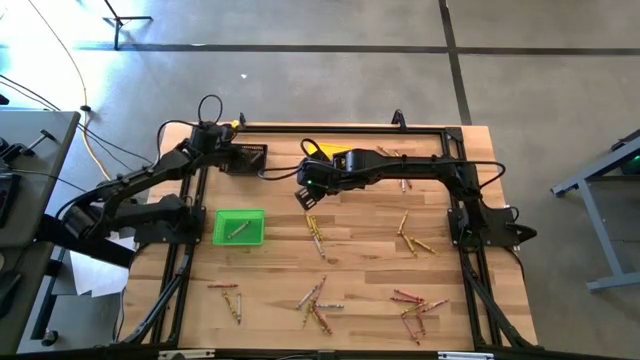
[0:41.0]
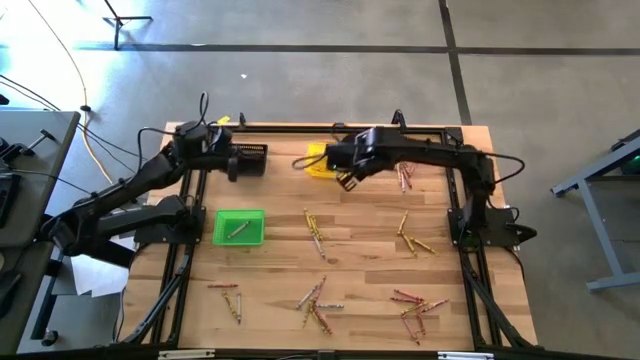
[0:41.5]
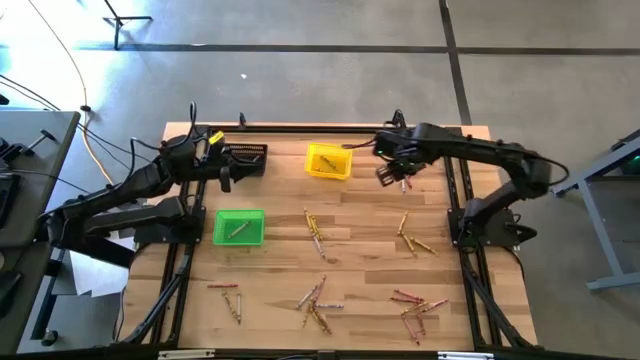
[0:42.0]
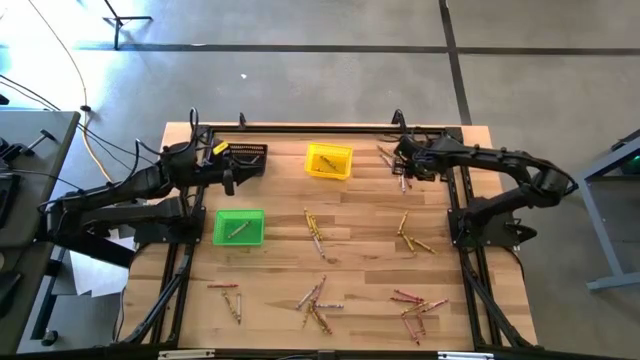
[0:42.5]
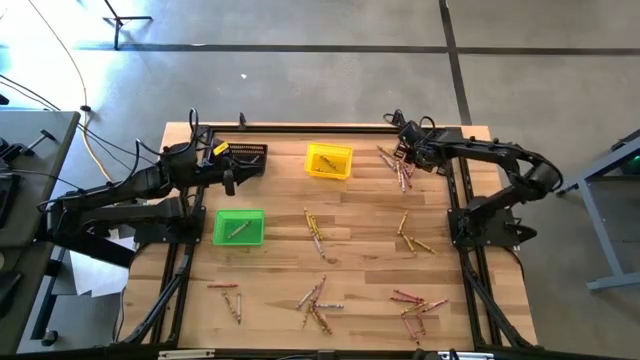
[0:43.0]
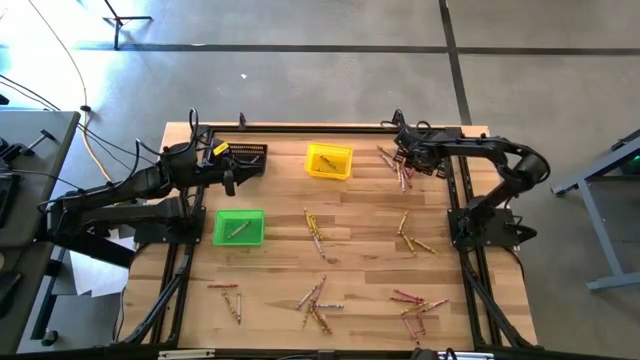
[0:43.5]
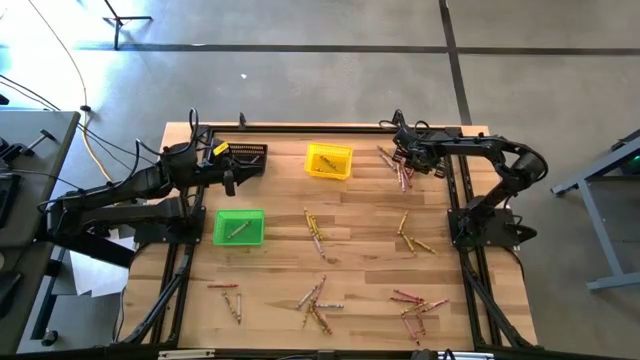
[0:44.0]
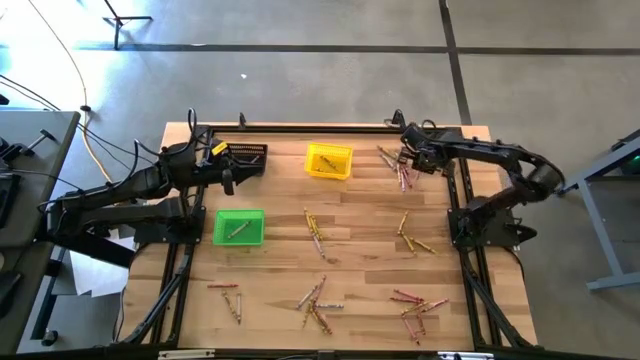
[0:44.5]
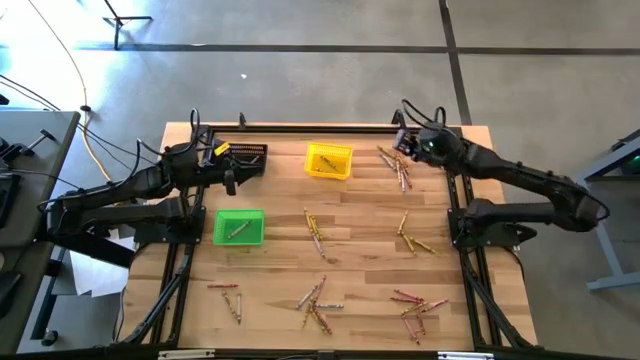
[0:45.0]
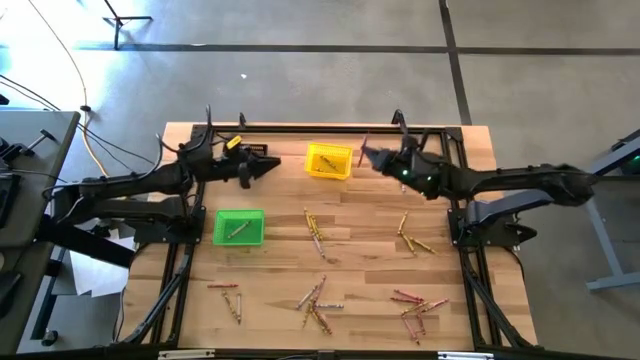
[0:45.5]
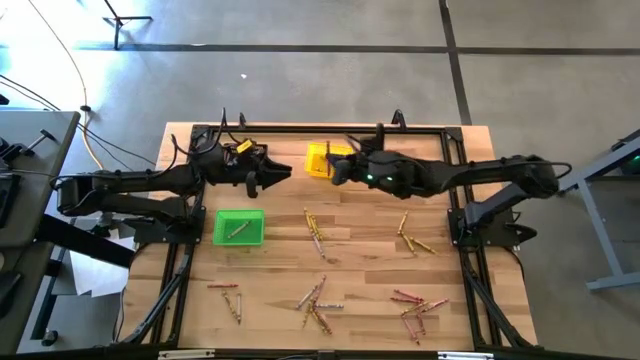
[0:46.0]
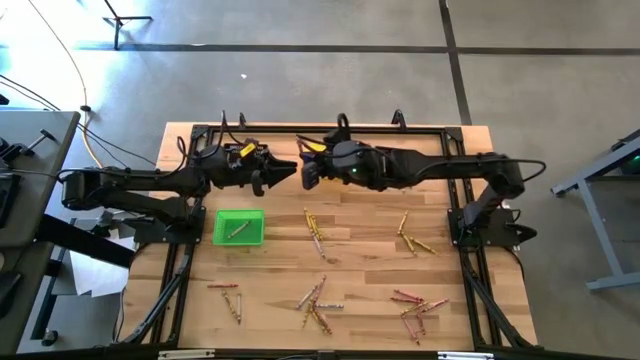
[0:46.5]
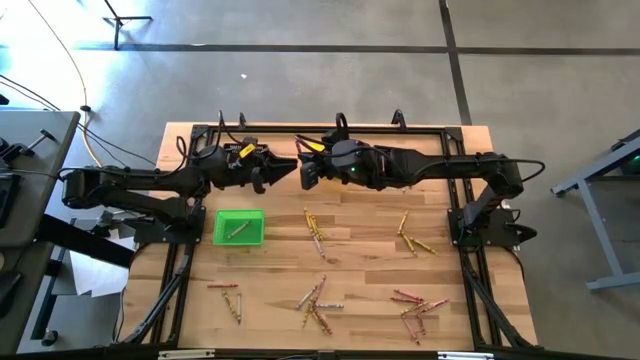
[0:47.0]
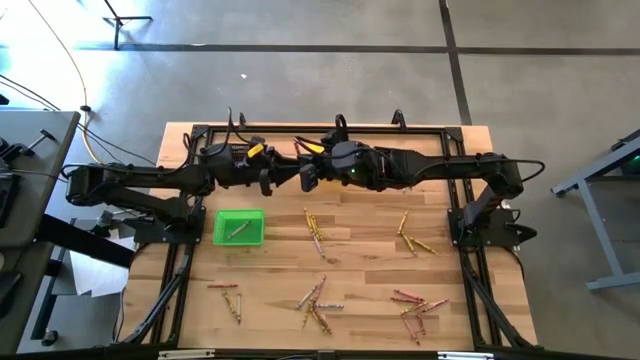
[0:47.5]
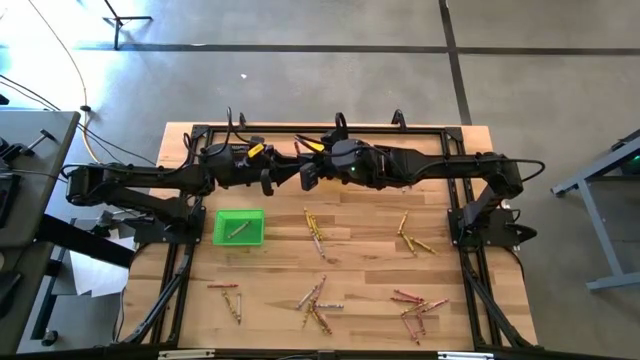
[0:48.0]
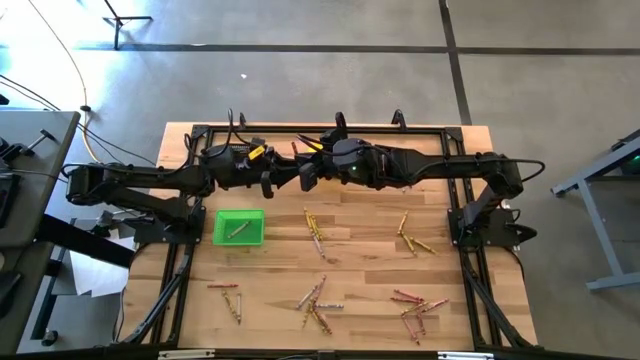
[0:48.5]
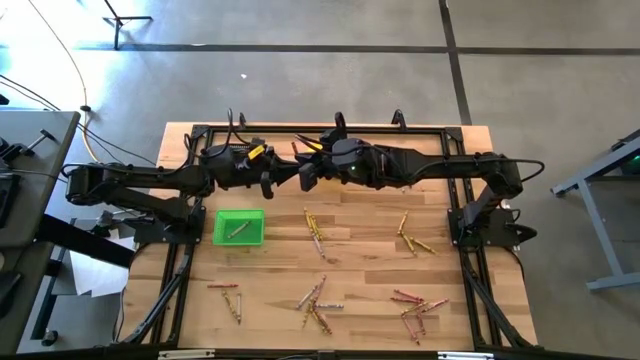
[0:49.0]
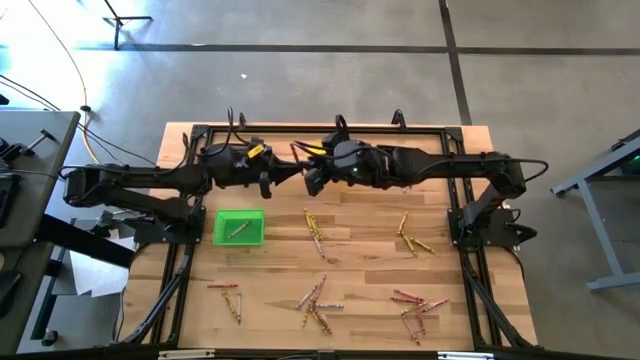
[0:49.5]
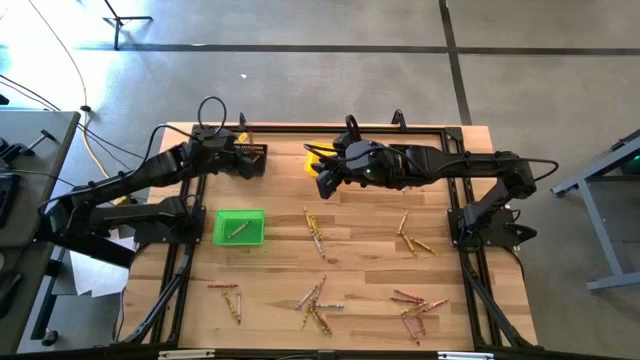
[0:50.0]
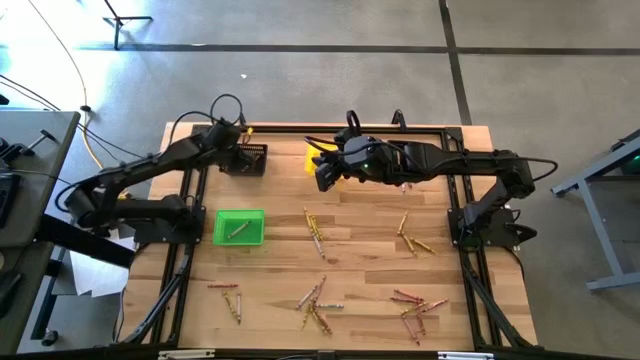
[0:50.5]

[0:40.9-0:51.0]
Task: Sort crayons
Put the red crayon into the black bin

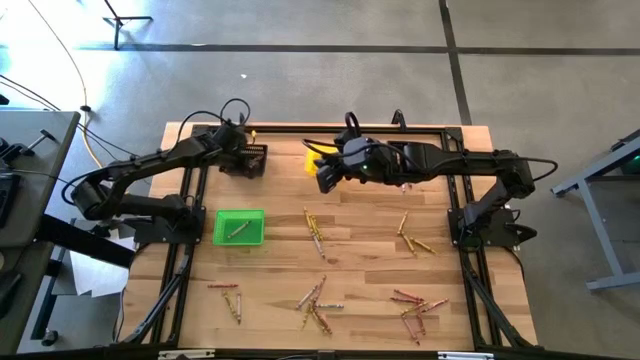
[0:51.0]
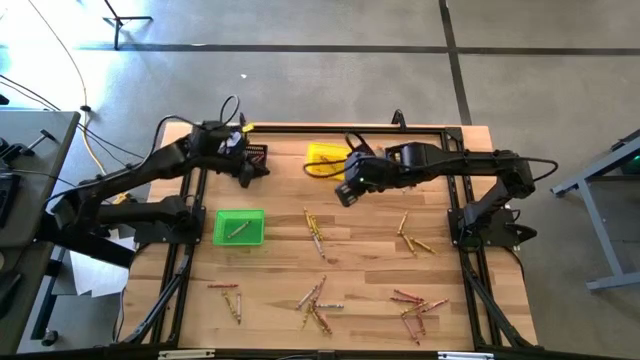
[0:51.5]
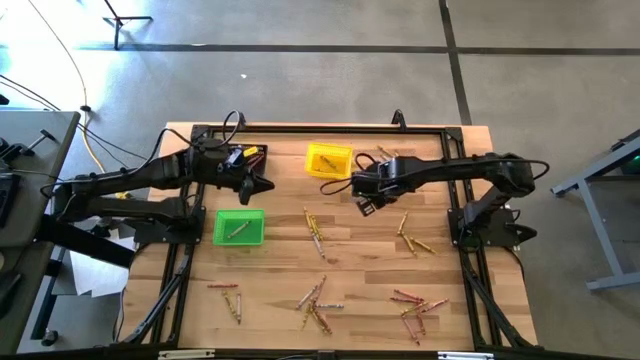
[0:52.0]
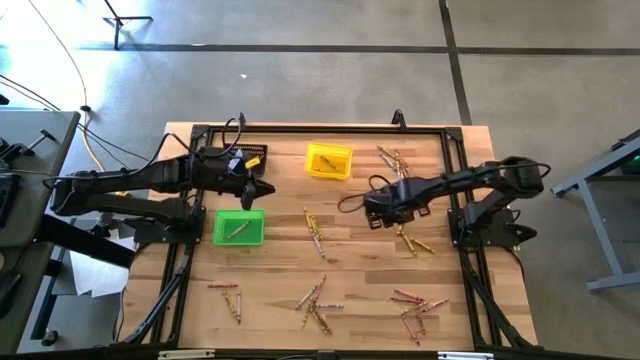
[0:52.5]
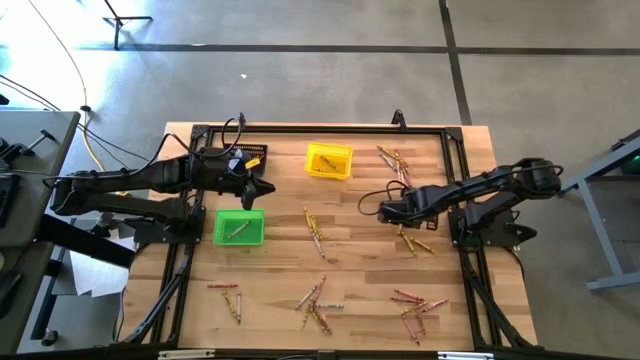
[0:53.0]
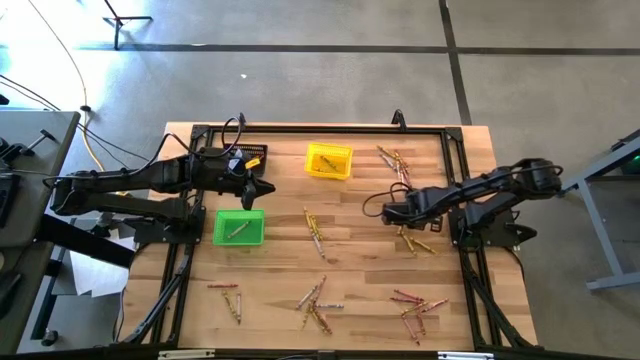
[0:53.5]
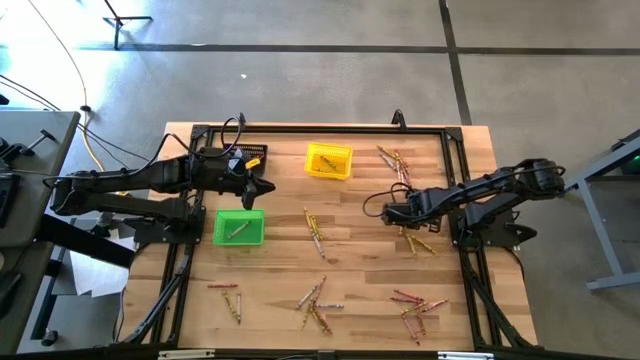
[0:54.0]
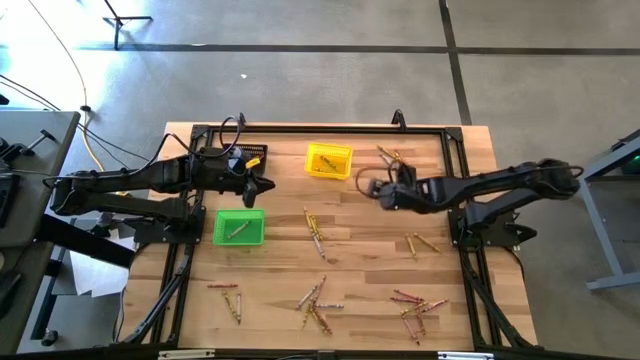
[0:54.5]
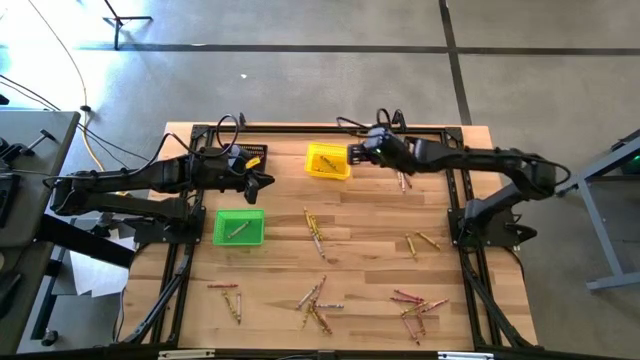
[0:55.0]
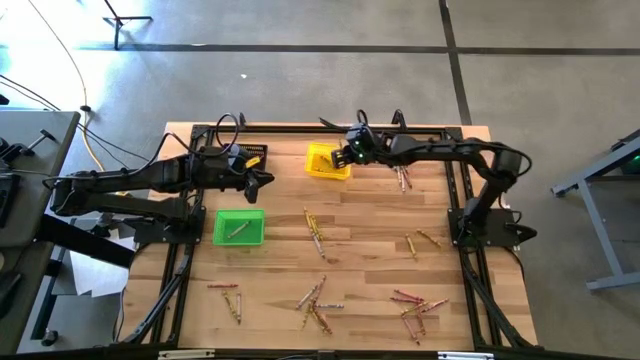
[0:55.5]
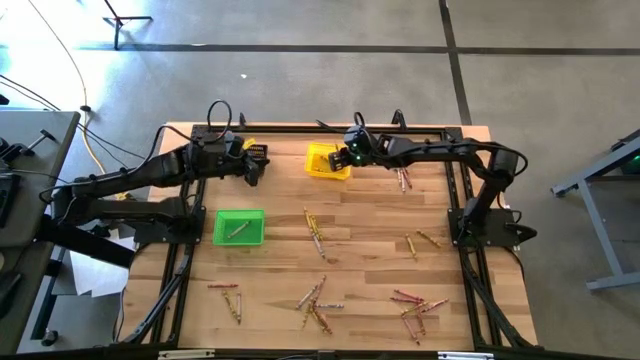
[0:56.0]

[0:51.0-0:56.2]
Put the yellow crayon into the yellow bin

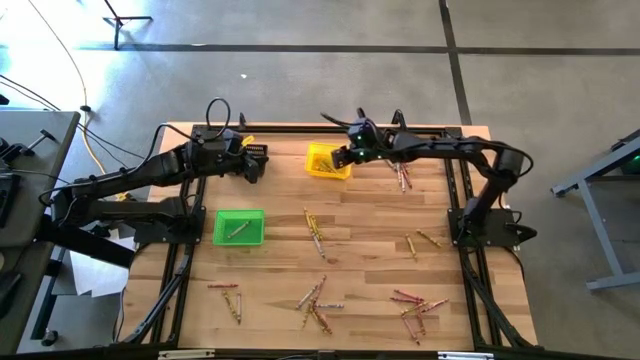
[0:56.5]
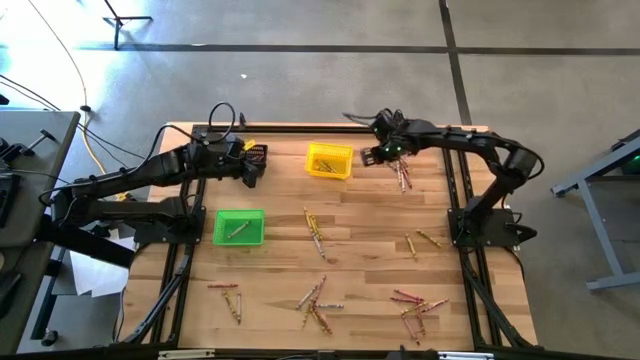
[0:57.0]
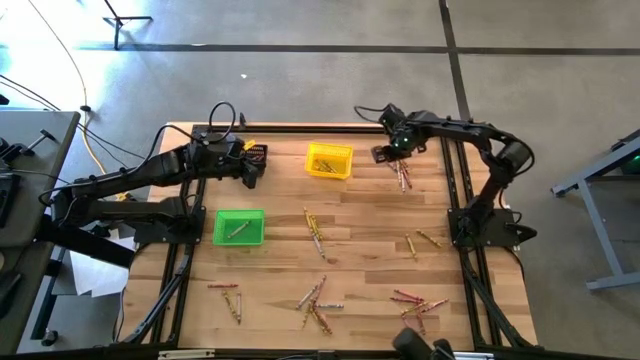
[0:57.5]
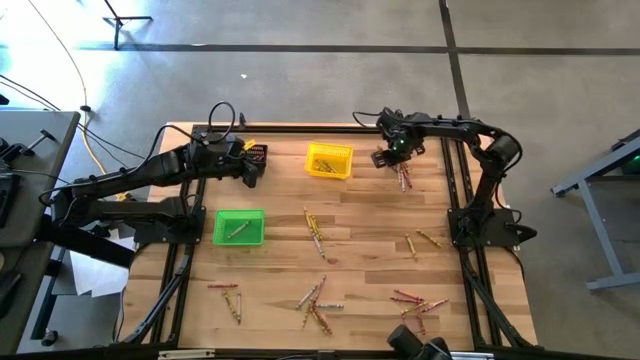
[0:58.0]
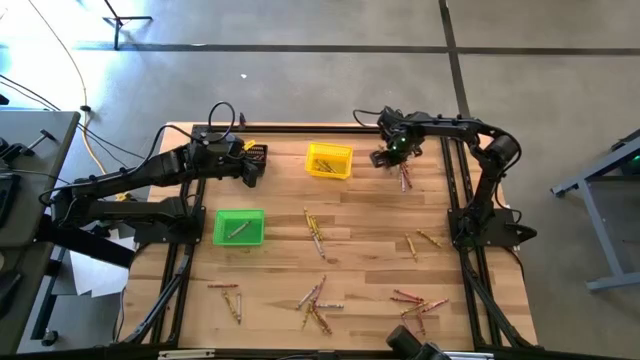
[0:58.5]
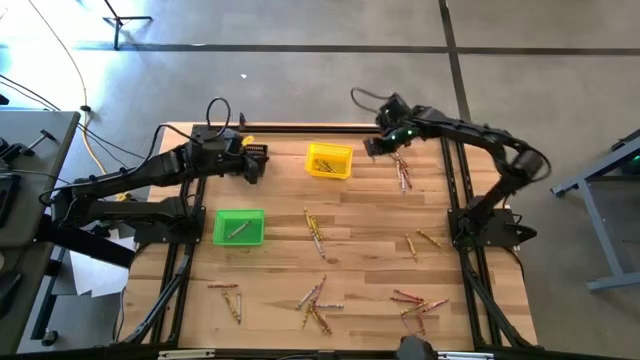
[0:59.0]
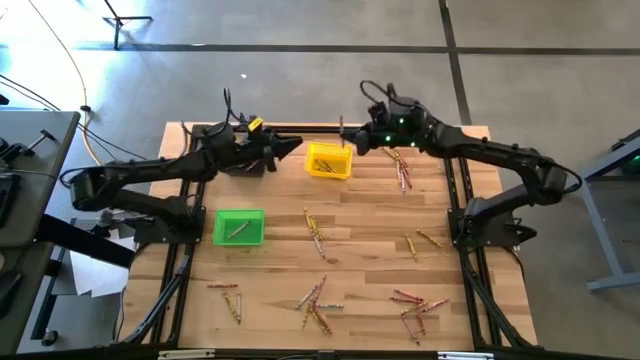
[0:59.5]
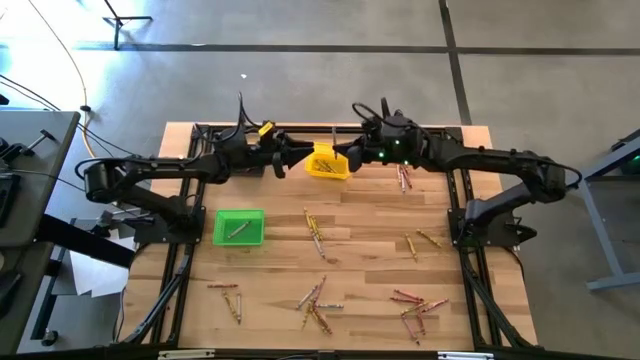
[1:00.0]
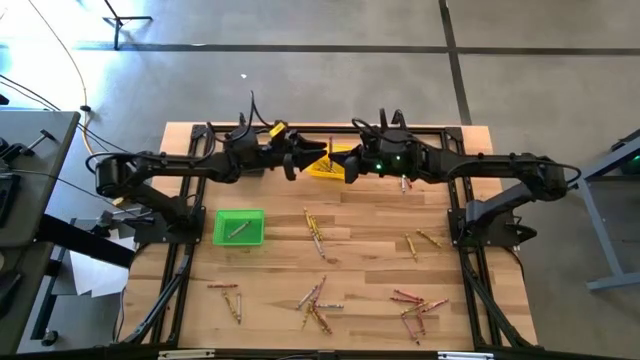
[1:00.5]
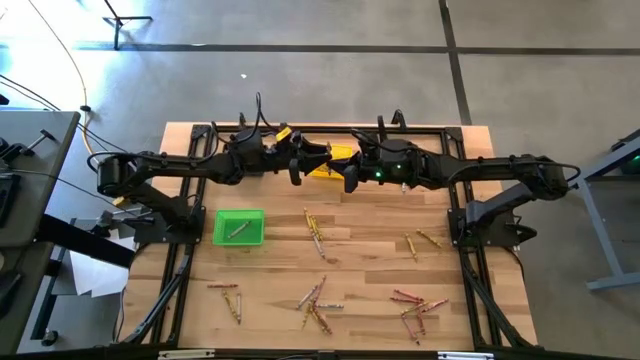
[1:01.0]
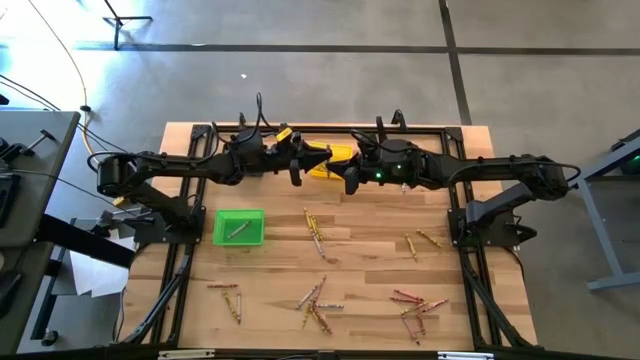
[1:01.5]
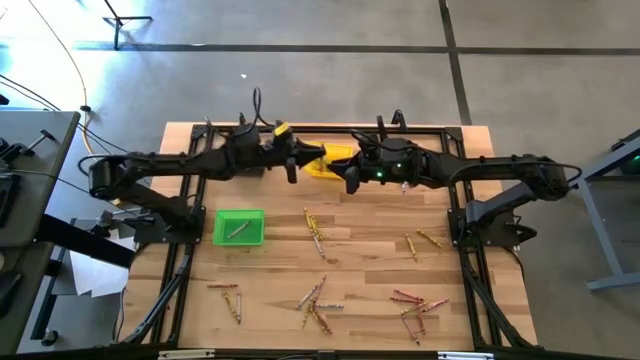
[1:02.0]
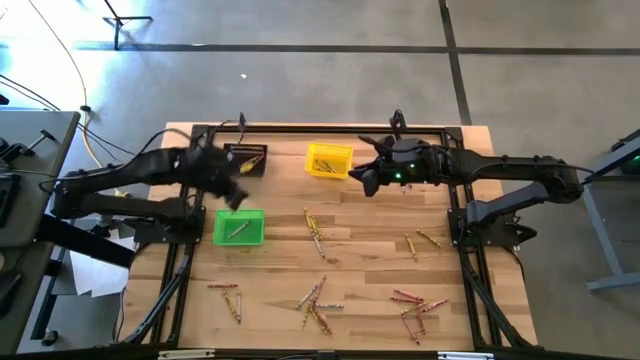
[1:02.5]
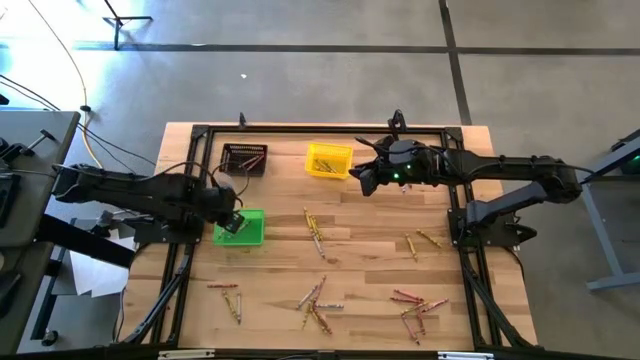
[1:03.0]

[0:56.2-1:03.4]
Put the blue crayon into the green bin
